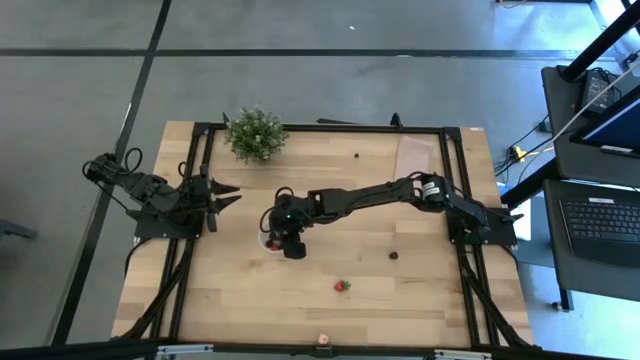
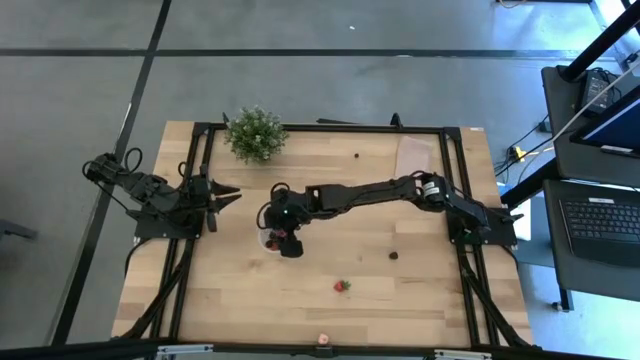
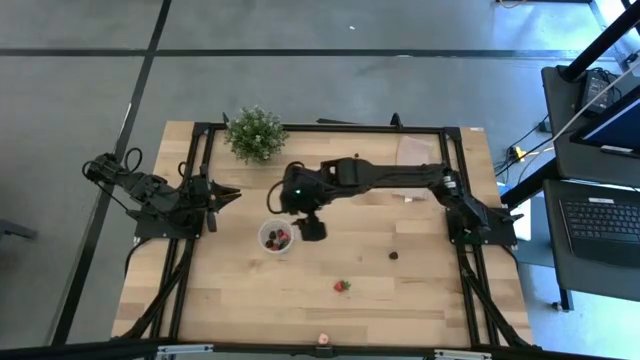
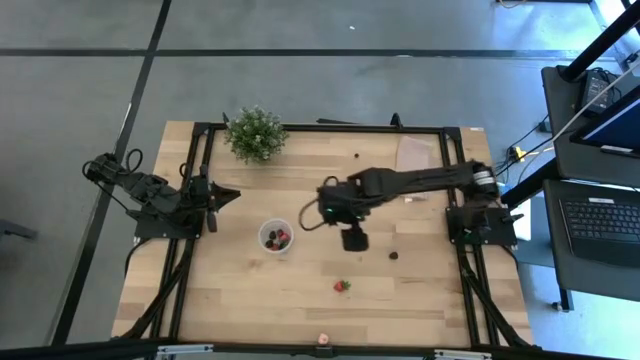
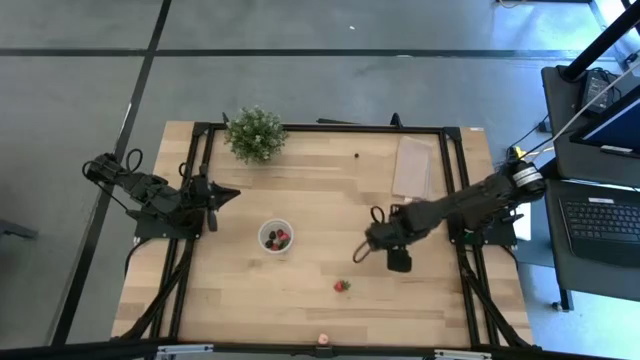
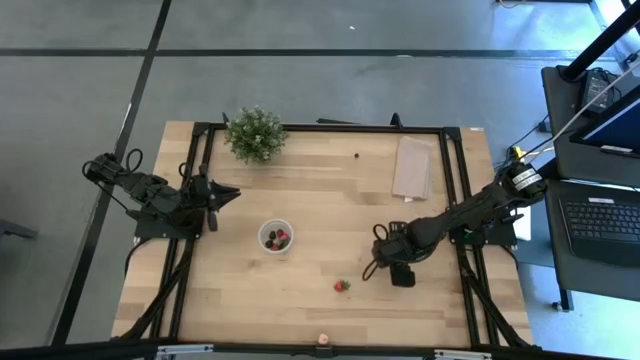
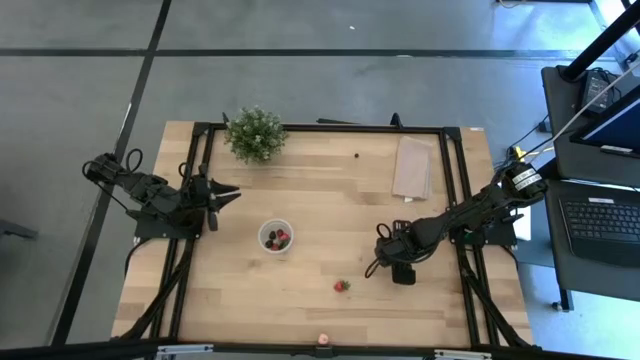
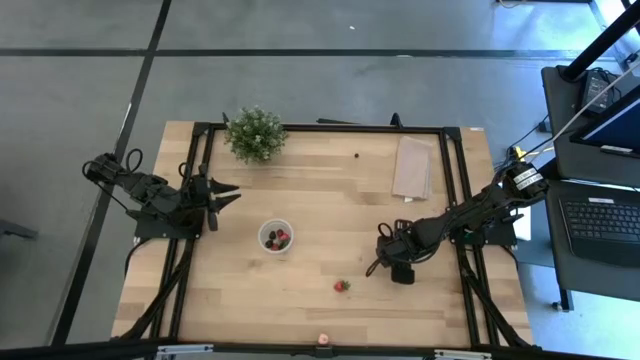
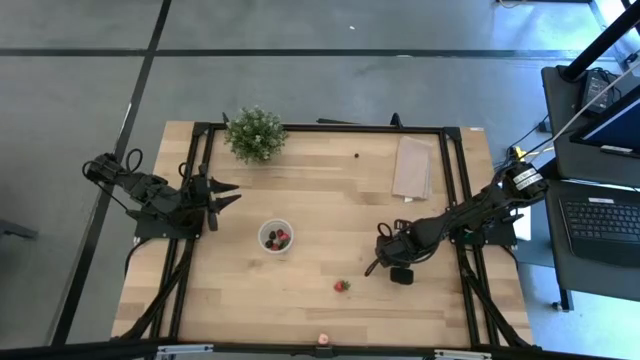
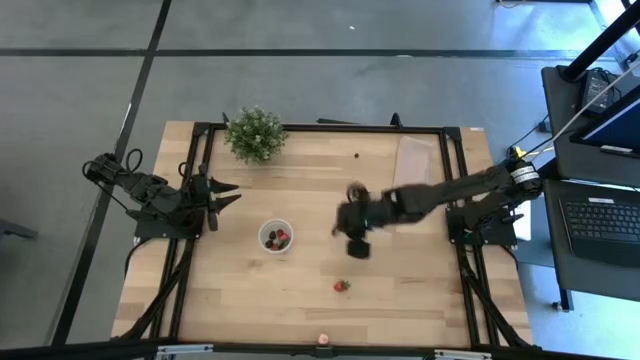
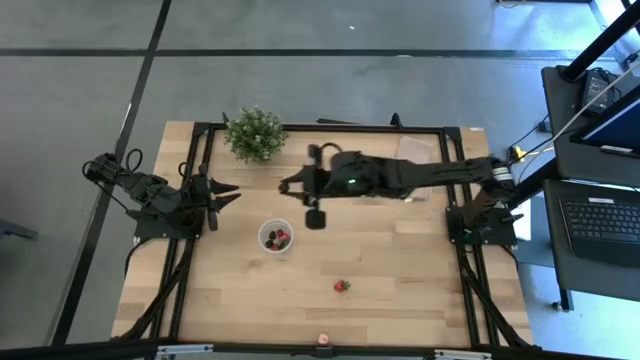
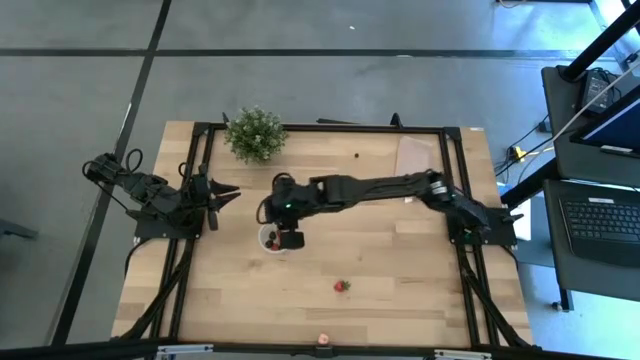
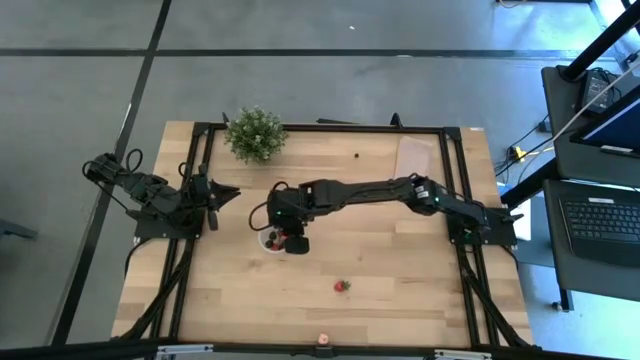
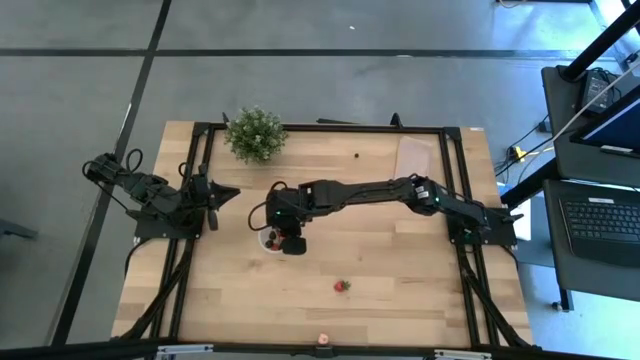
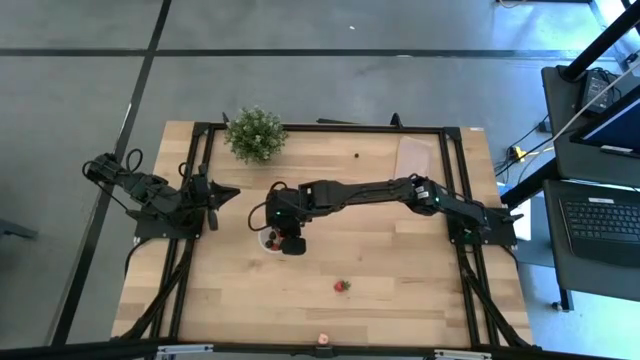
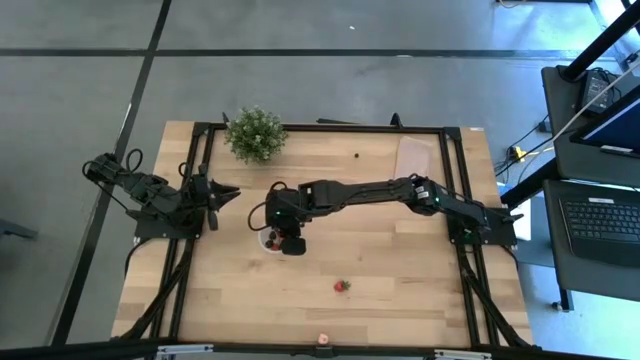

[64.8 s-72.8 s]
Task: Pick and placing Produce into tupperware
Put the blackberry into the container

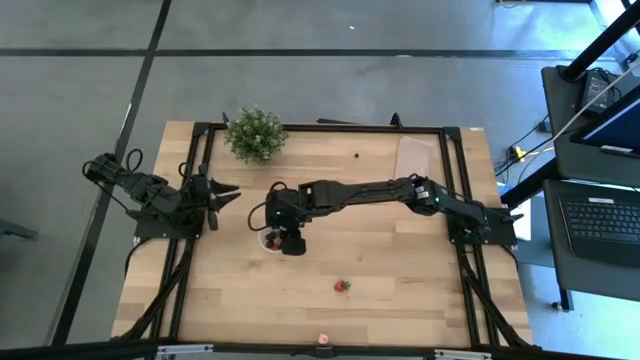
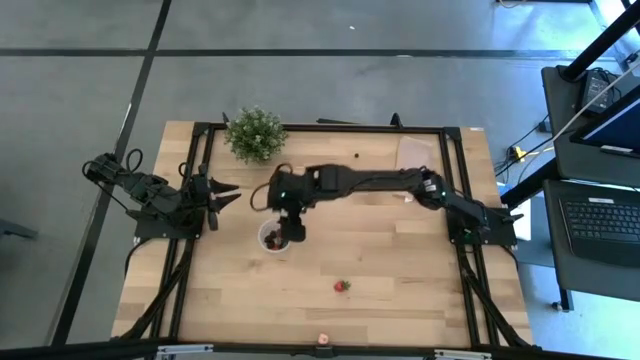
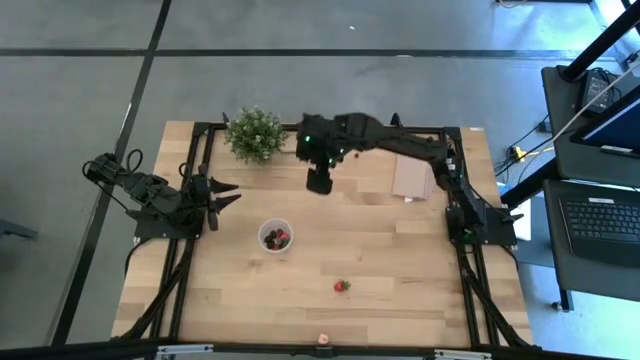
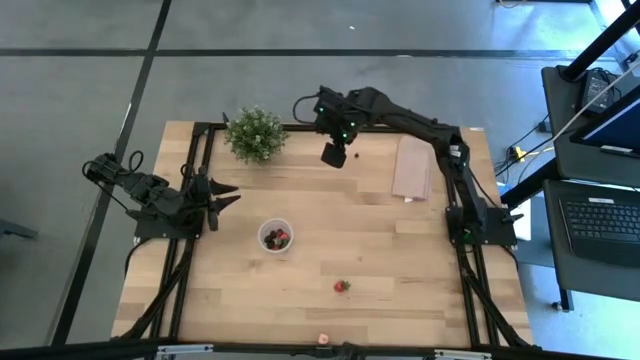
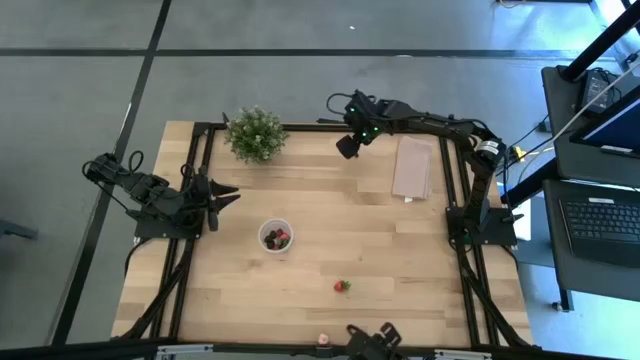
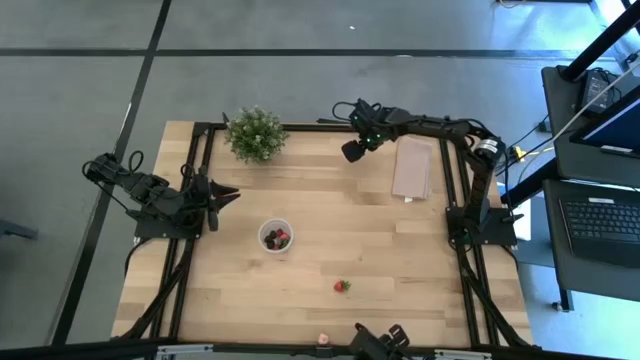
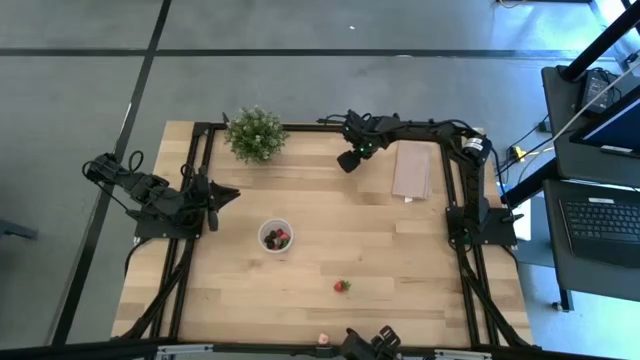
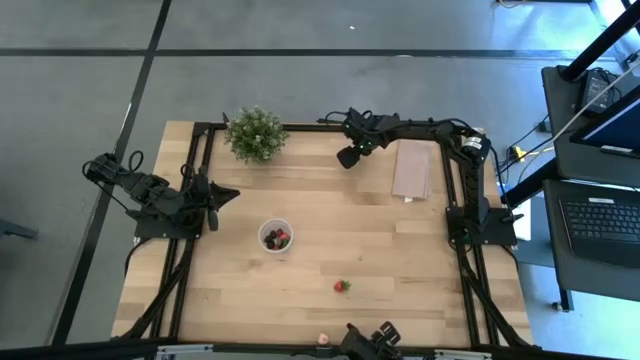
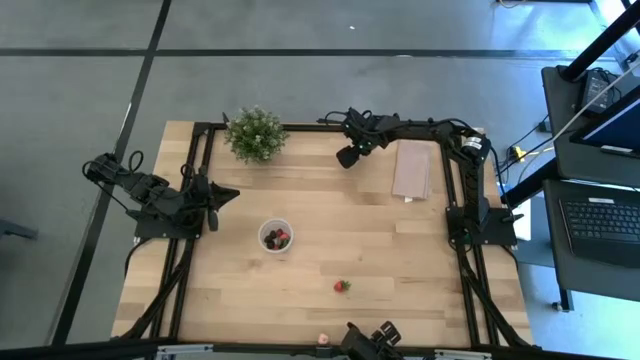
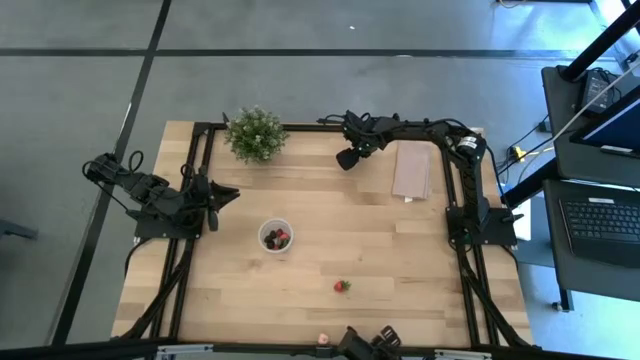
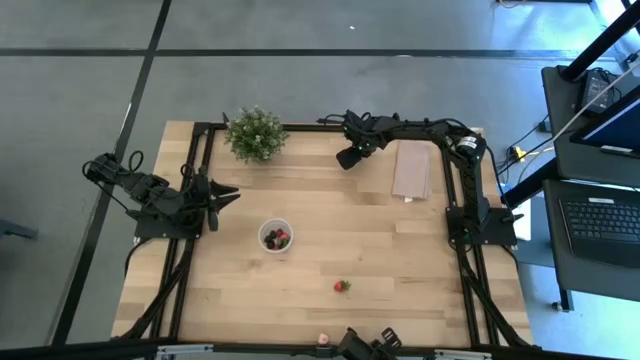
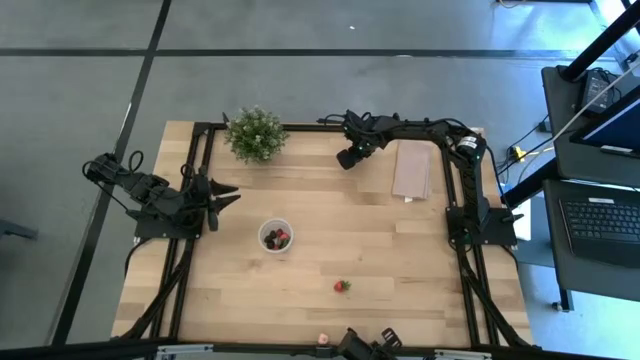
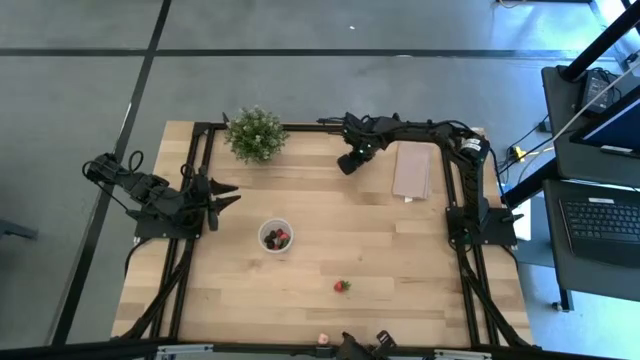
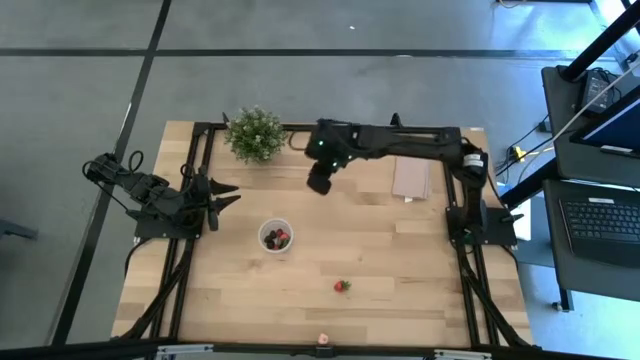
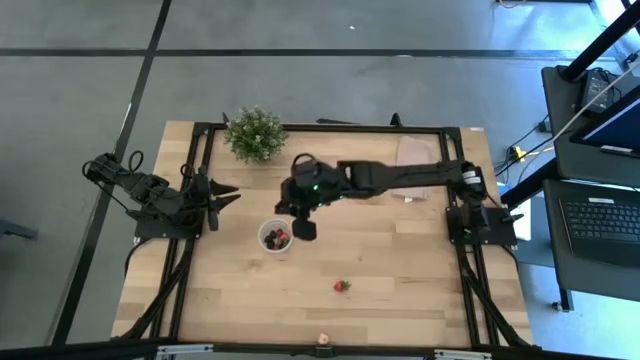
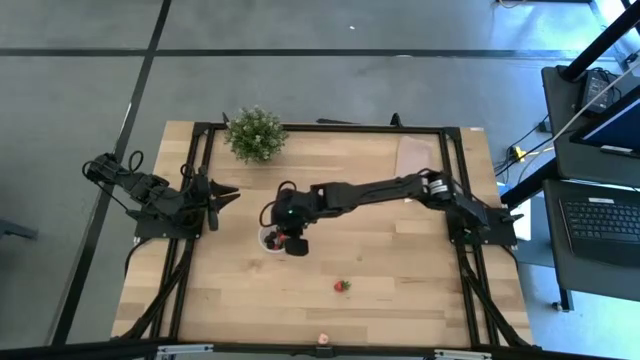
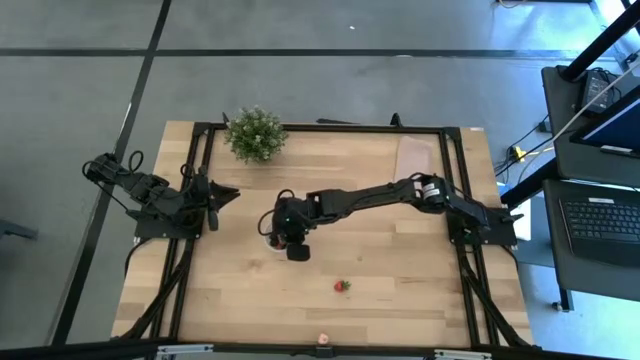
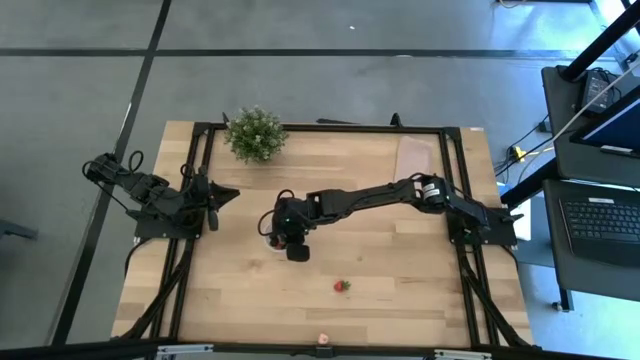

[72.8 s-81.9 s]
Put the blueberry into the container

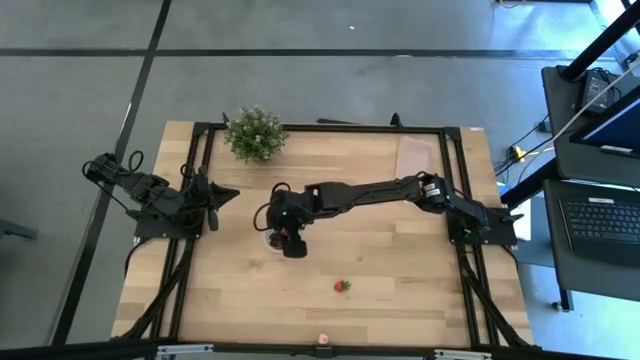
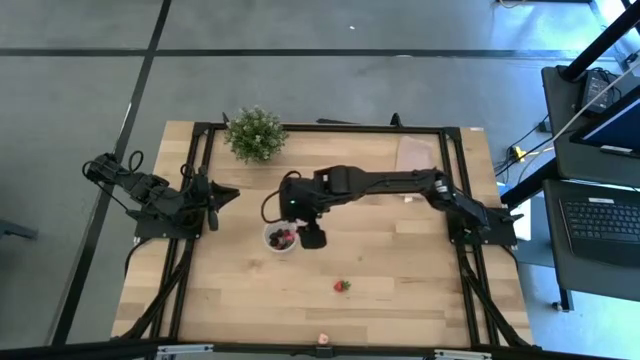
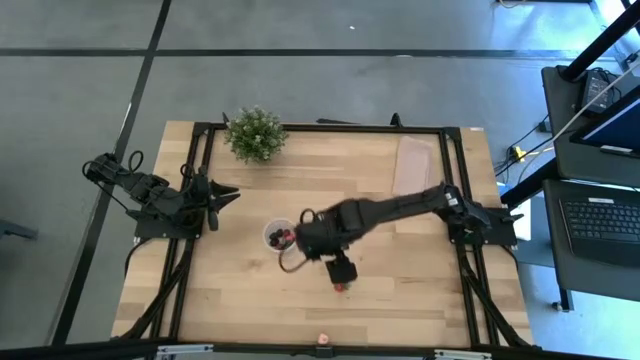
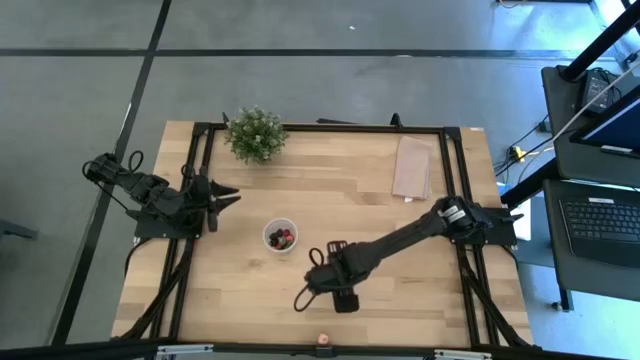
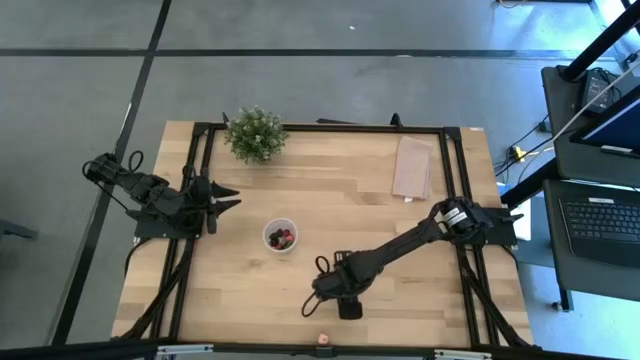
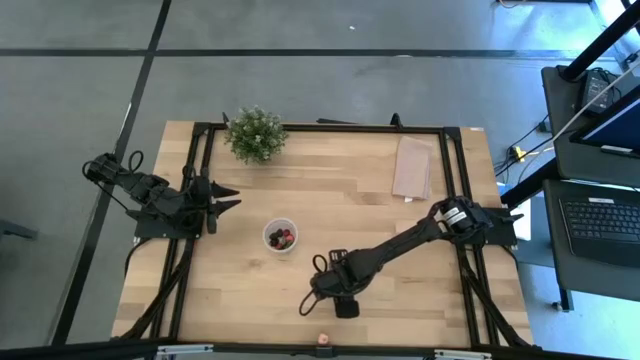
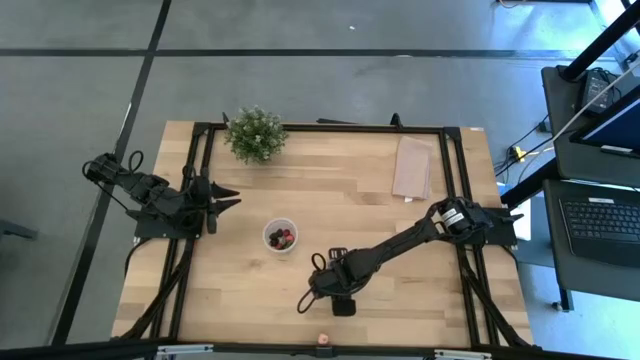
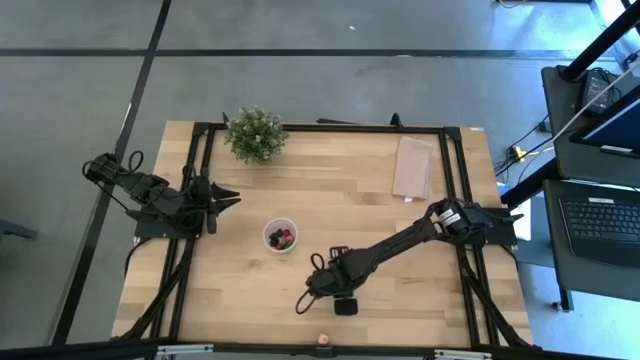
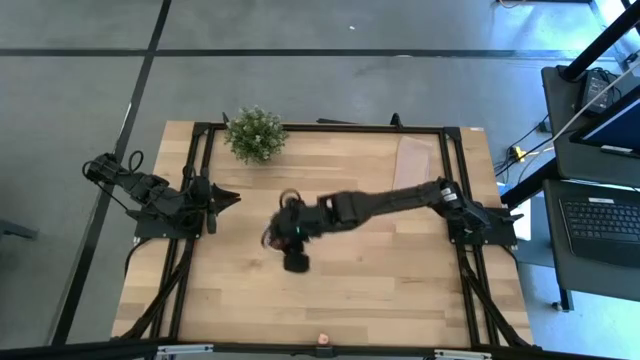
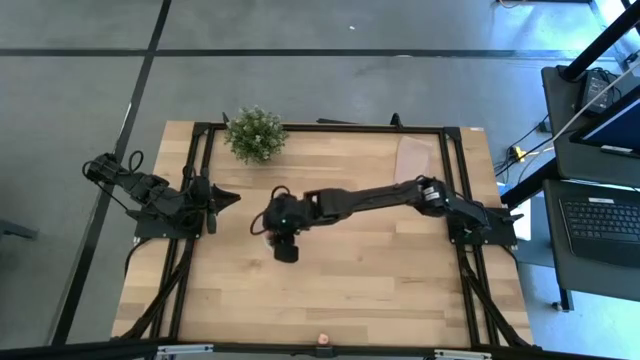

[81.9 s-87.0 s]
Put the red strawberry into the container

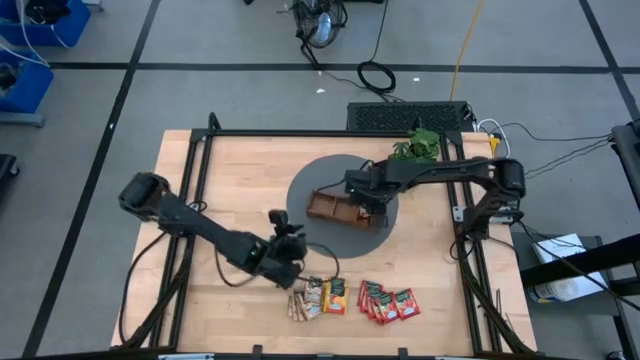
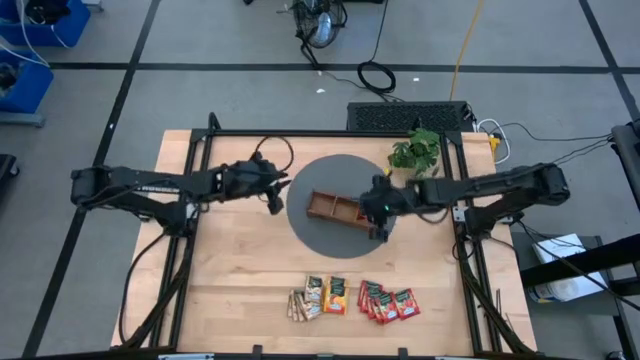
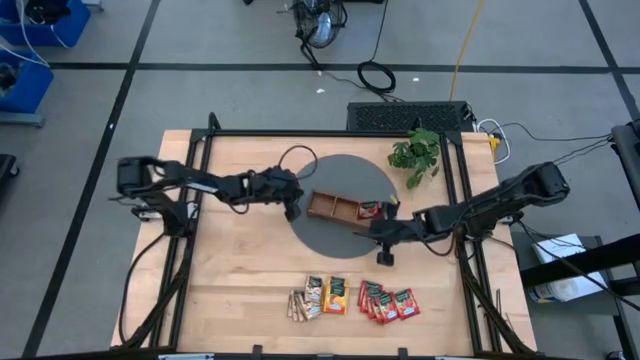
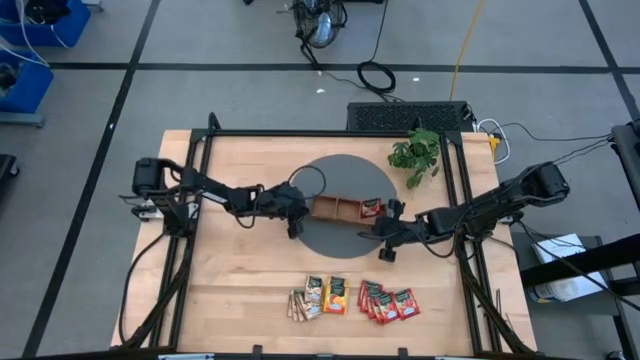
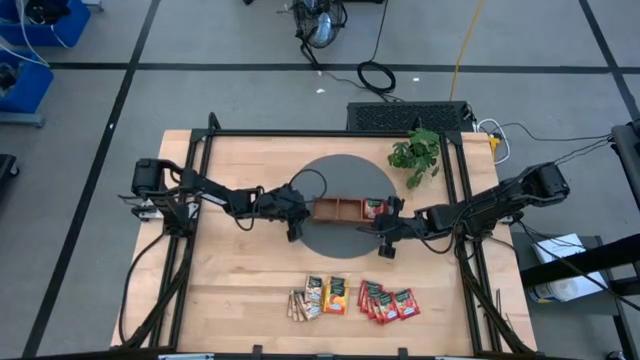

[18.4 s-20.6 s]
Task: Pick & Place Tea
Adjust the wooden organizer
